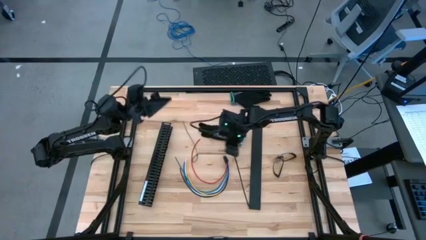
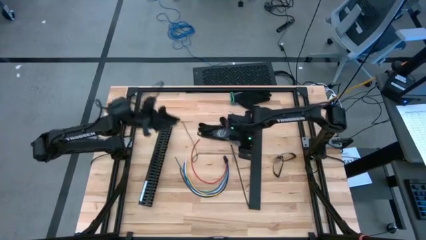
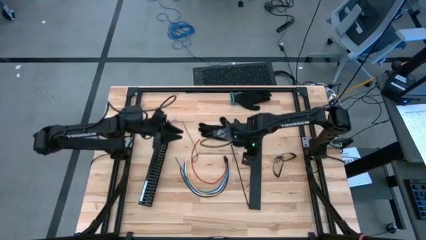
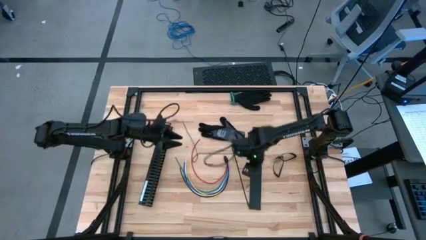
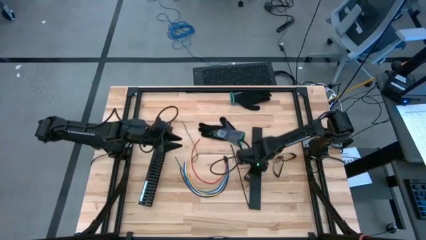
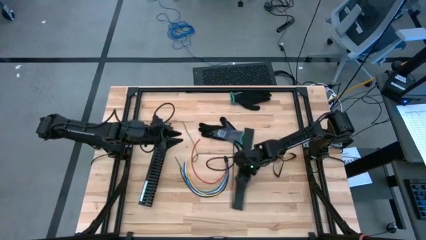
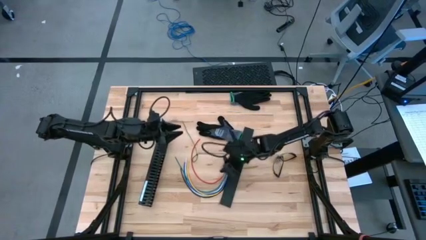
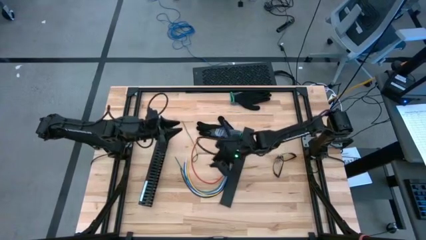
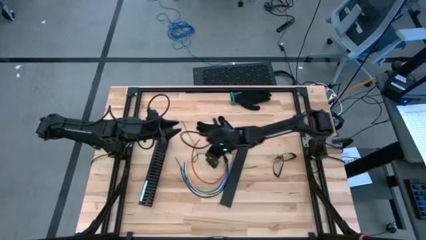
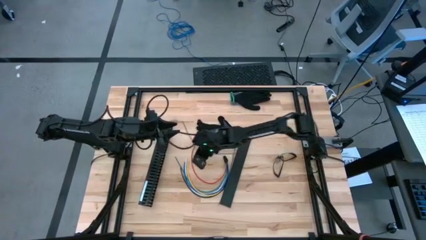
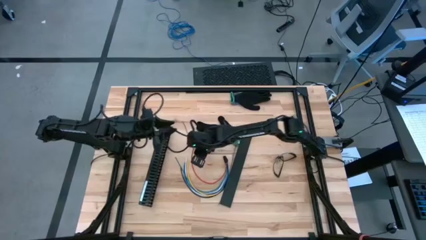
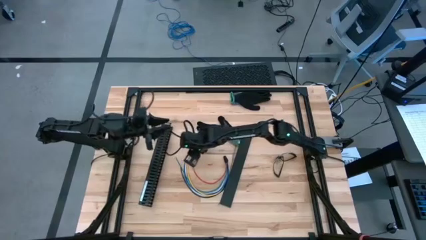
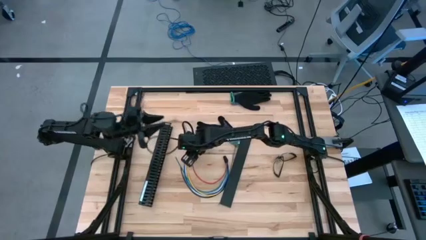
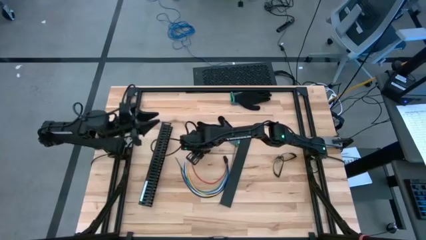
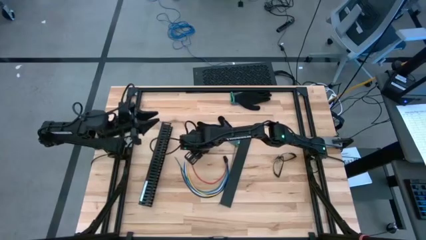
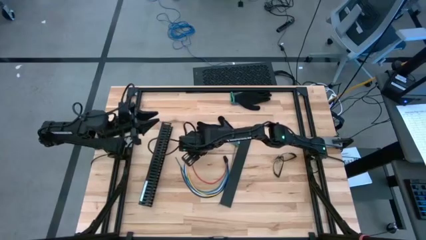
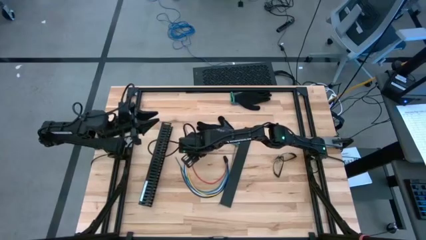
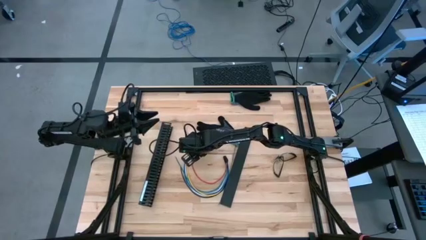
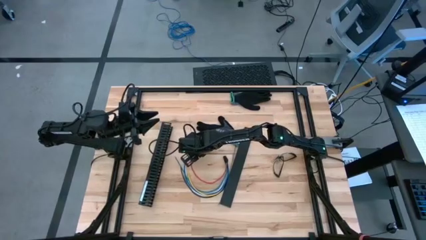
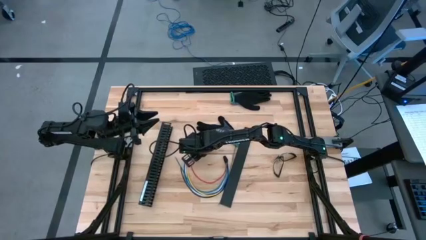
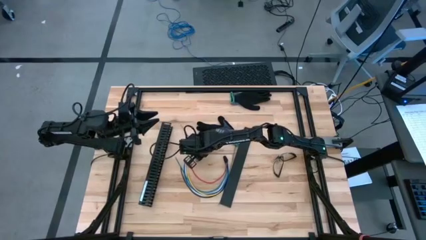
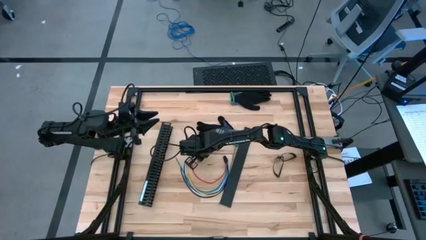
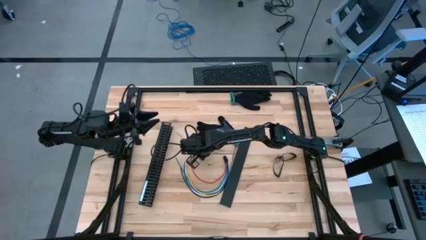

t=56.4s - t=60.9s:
Task: Ziptie cables
Put the black zip tie on the table

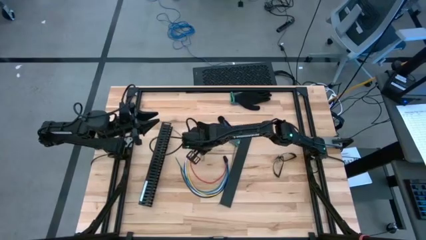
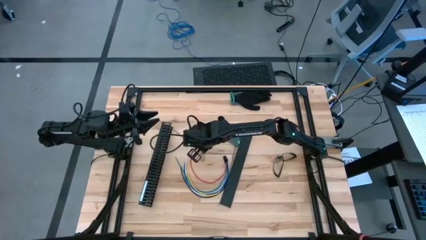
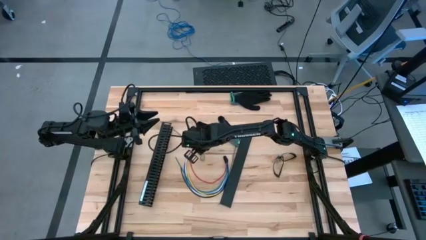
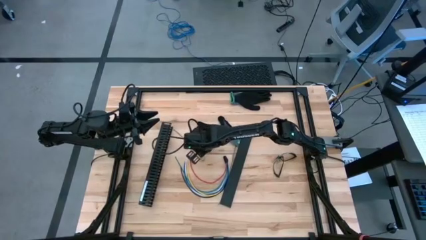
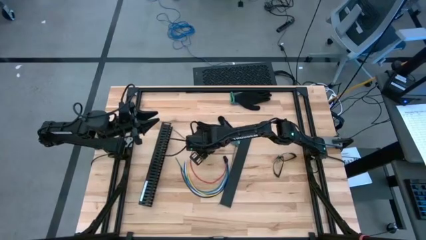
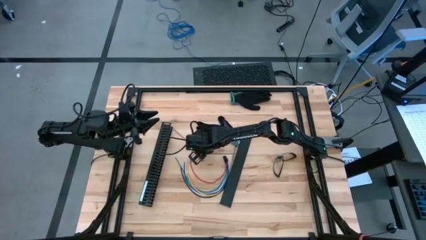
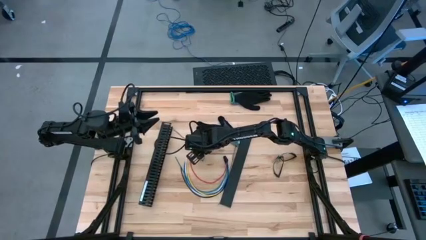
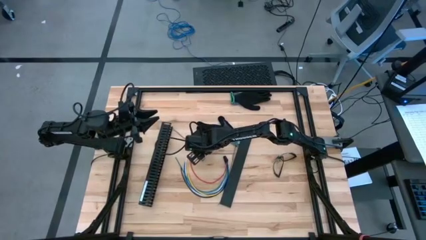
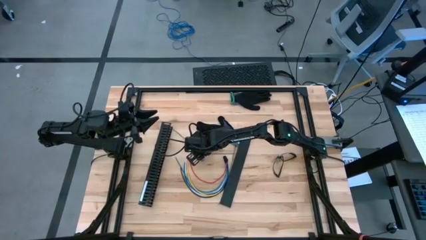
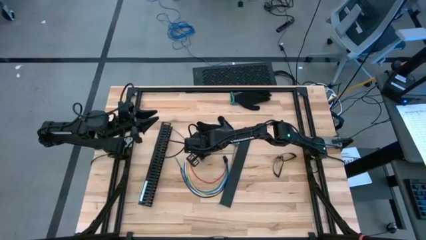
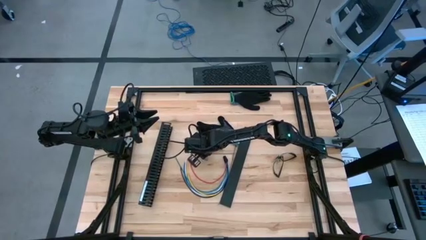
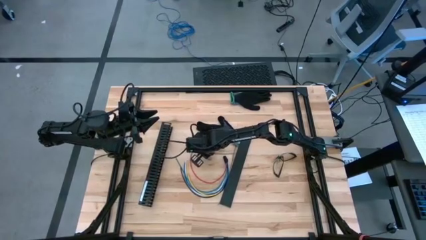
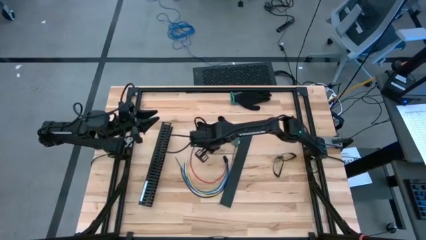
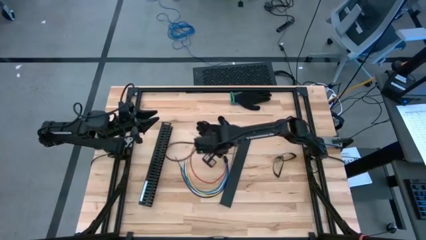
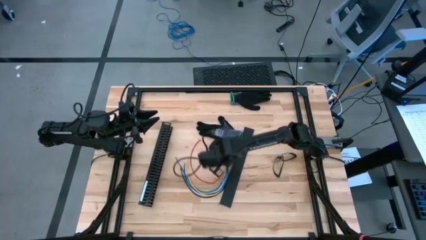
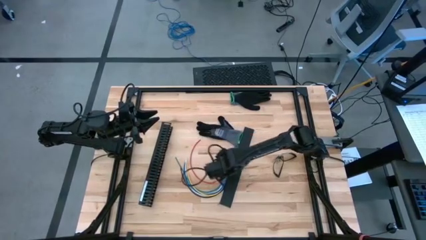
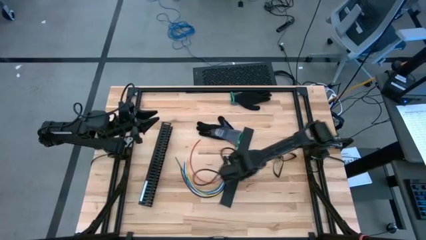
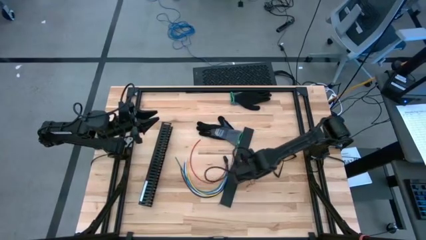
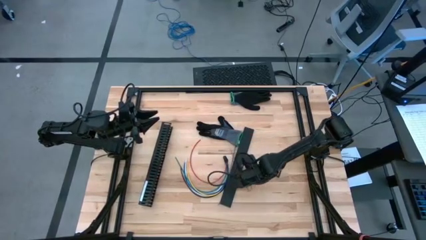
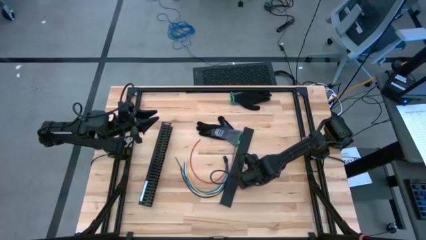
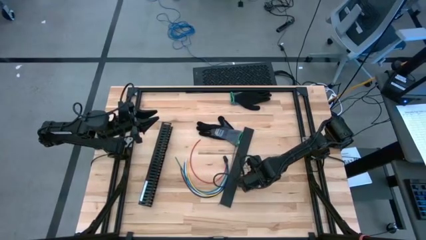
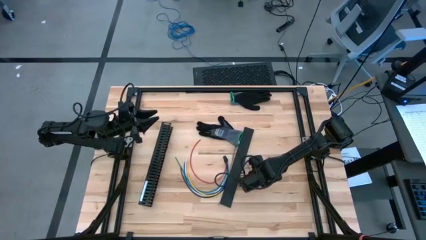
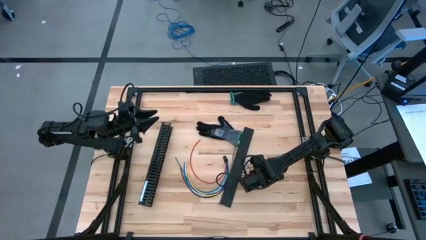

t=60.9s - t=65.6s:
Put the black zip tie on the table
